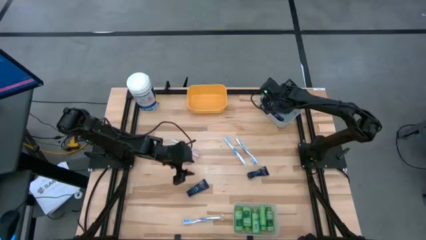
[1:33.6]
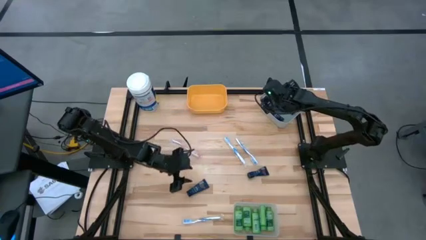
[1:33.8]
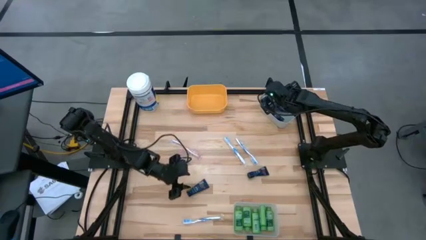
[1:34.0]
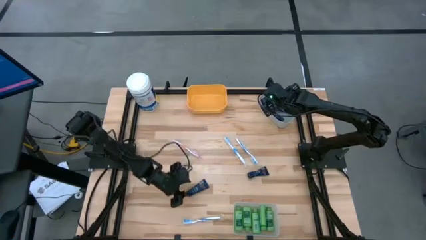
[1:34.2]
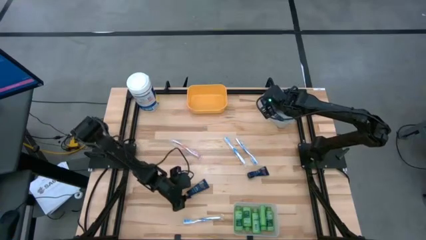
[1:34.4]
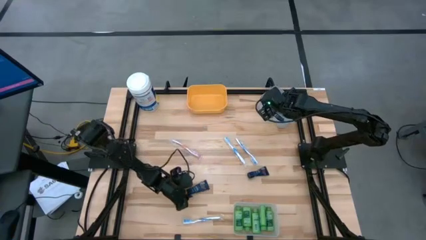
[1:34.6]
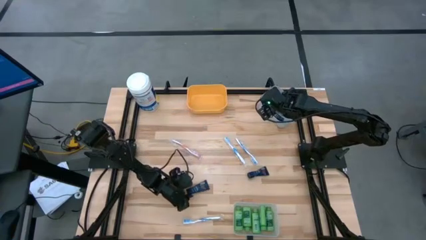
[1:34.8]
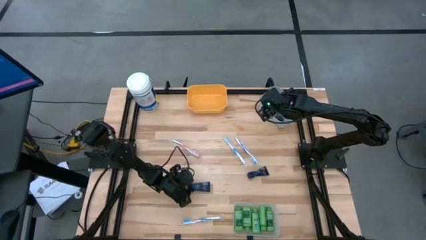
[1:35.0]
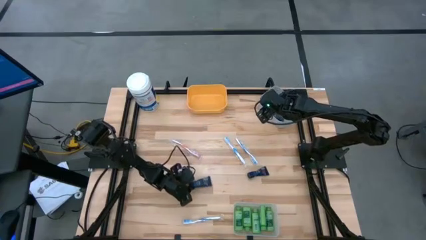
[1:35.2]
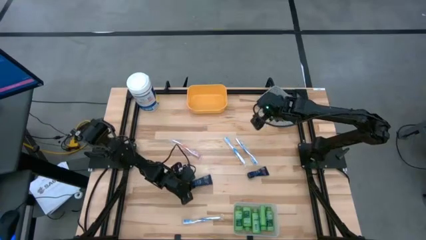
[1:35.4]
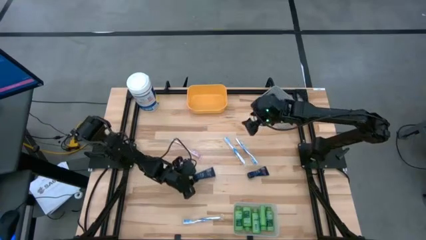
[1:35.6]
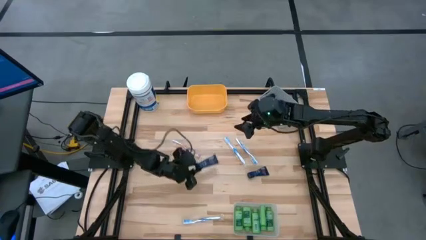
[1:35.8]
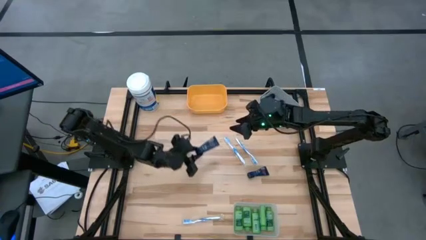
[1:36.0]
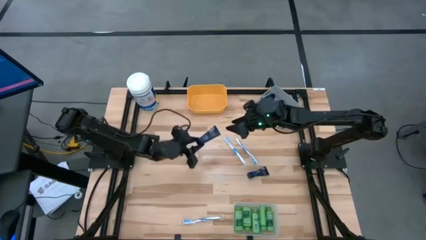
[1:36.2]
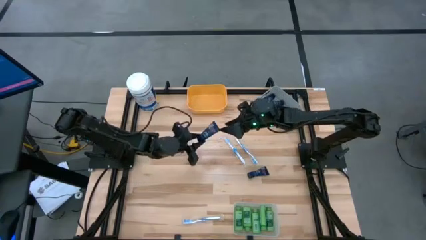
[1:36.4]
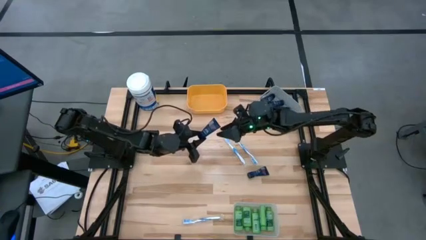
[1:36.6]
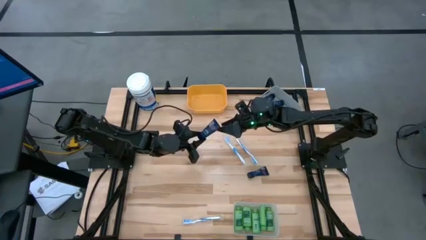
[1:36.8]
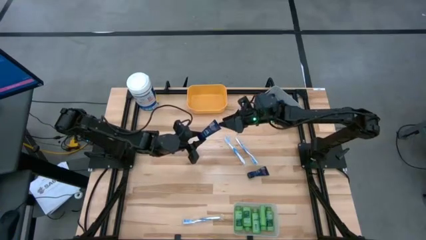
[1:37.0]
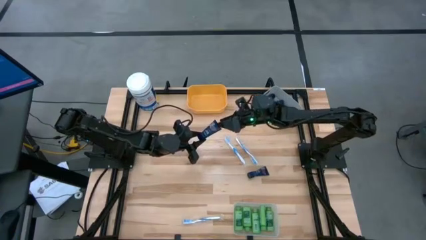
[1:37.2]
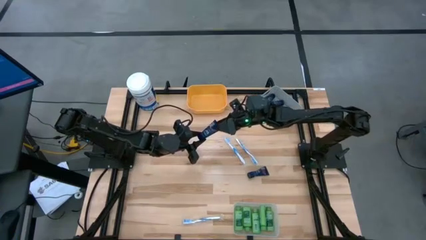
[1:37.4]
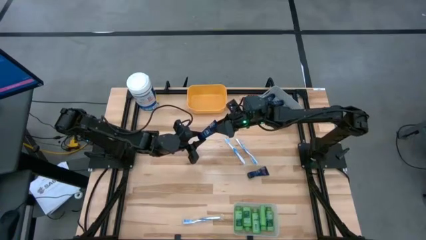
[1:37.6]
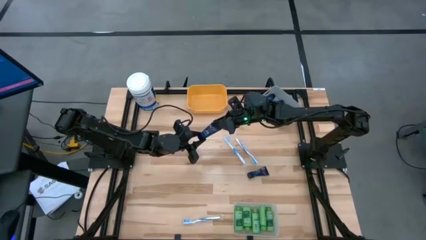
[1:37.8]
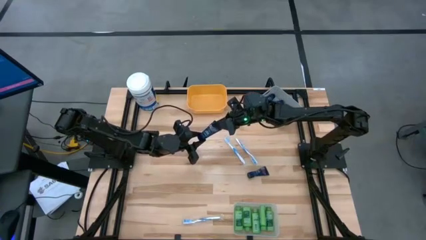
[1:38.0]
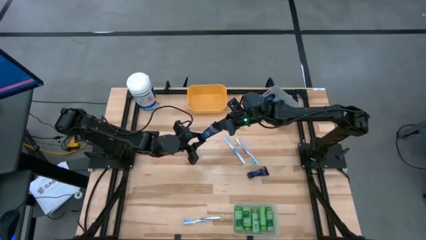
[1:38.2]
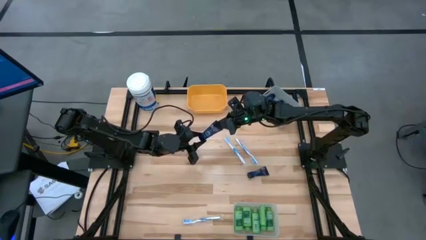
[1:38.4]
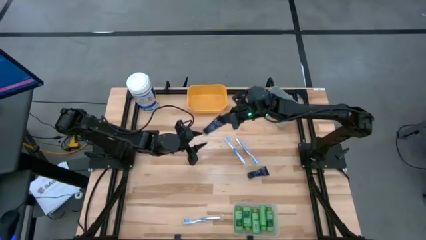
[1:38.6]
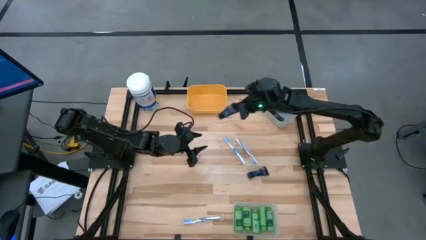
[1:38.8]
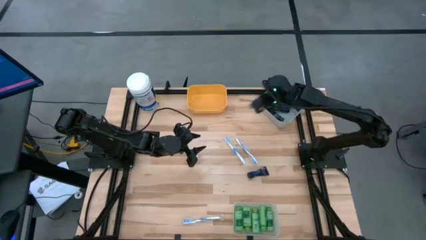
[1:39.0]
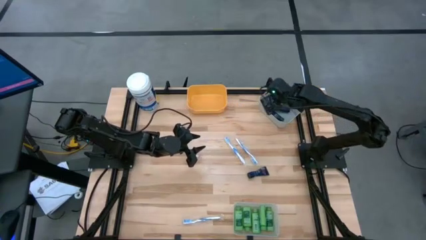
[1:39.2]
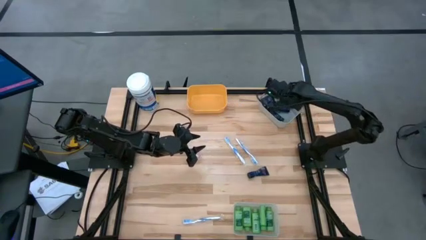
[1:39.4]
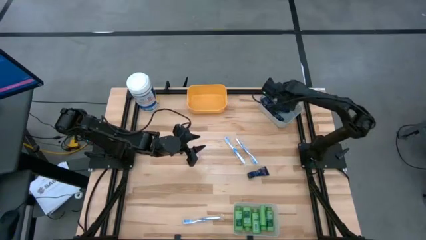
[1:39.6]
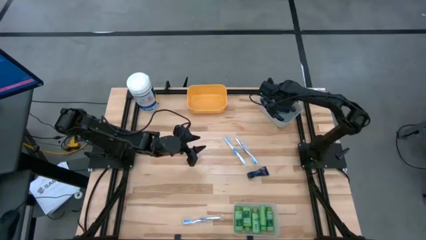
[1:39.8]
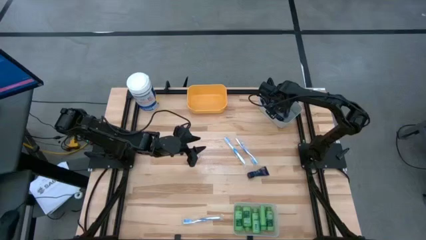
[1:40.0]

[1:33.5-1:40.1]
Task: Pick & Place Travel size toiletries
Put the blue shaving cream into the grey bin

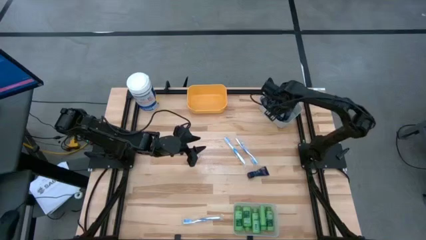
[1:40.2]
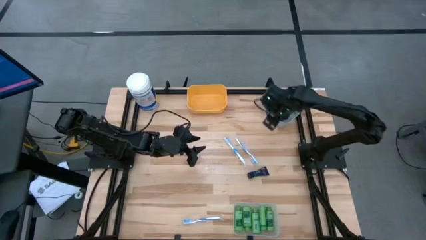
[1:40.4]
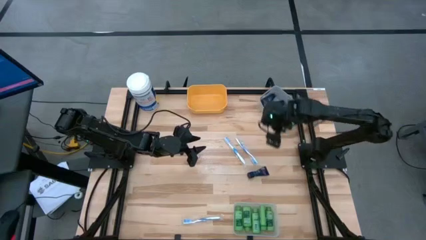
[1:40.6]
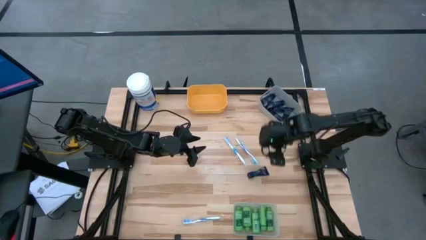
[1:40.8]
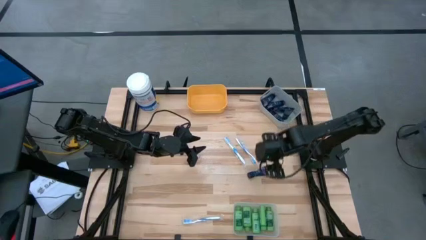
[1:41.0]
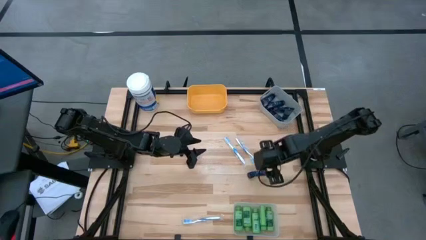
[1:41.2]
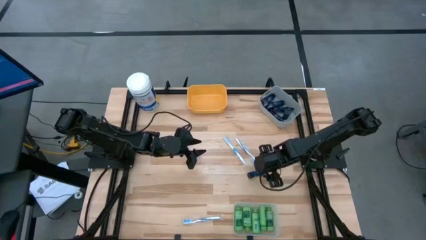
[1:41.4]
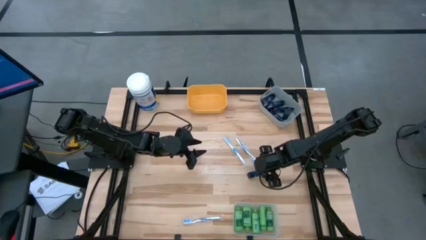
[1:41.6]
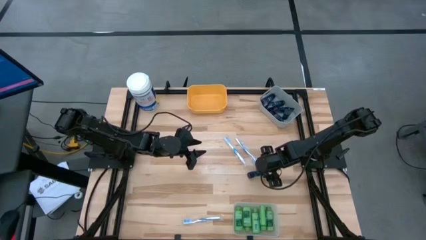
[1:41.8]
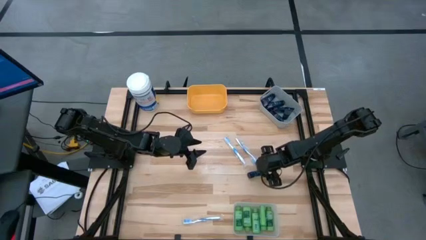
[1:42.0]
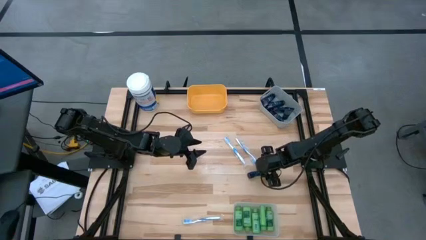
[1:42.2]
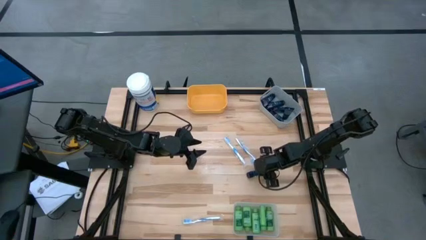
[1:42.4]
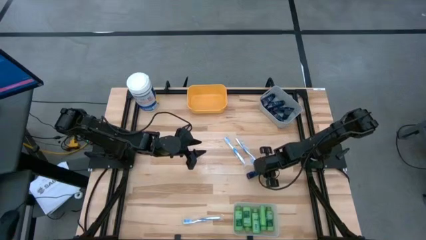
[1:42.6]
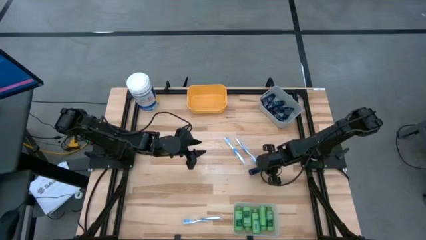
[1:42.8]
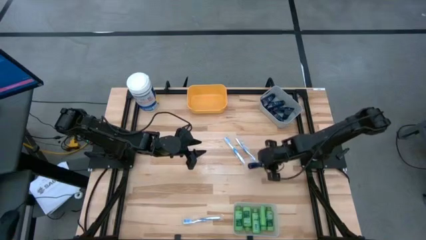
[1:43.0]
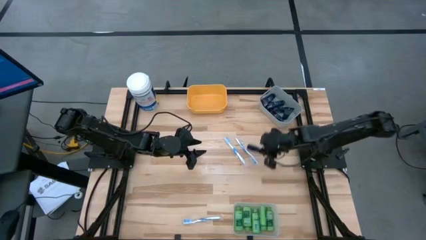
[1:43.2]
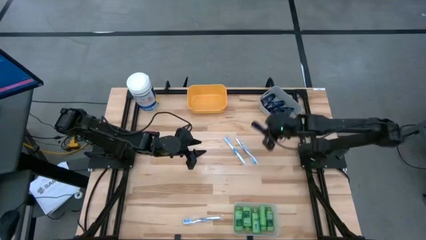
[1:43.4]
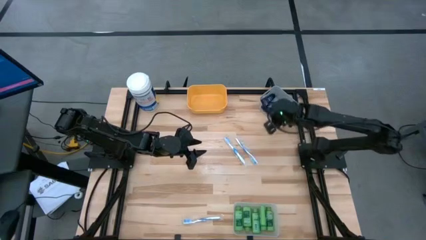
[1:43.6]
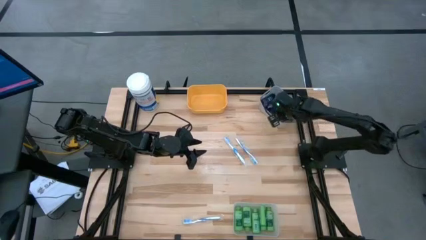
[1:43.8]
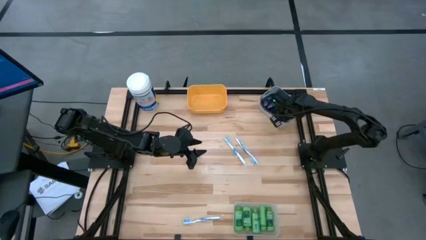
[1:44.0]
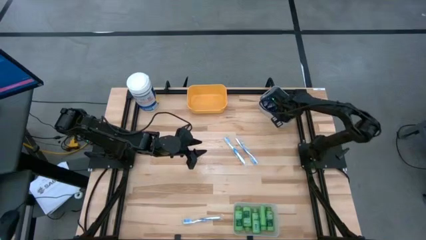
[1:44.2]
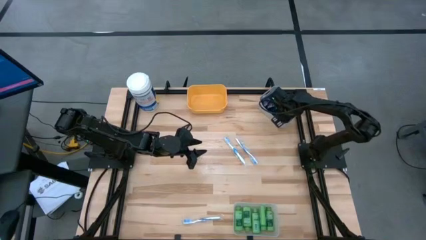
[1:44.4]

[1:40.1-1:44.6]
Put the blue shaving cream into the grey bin

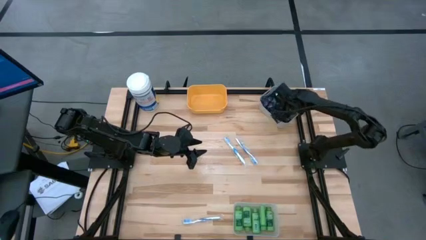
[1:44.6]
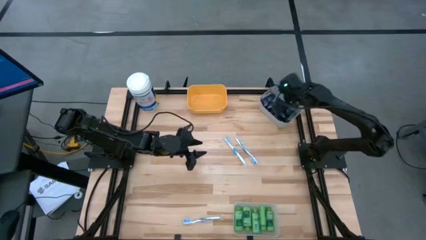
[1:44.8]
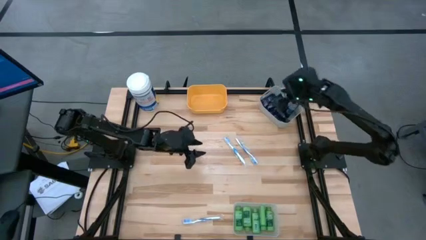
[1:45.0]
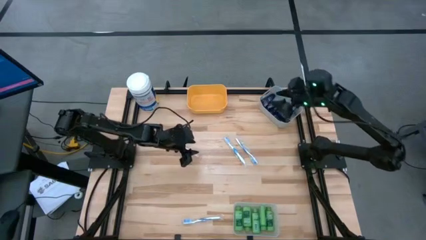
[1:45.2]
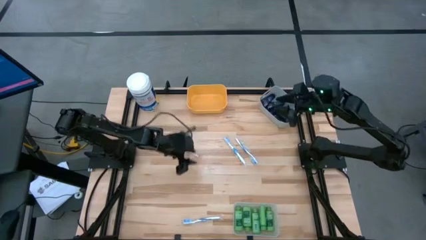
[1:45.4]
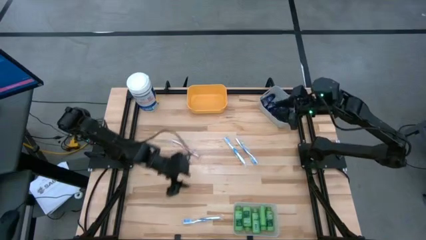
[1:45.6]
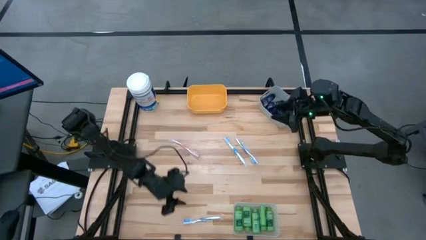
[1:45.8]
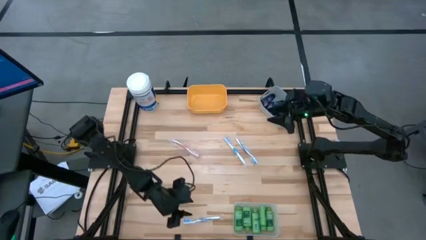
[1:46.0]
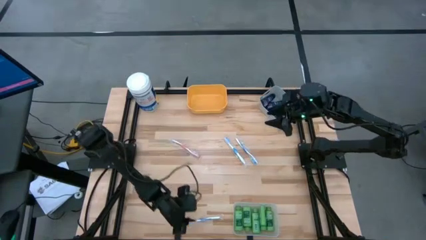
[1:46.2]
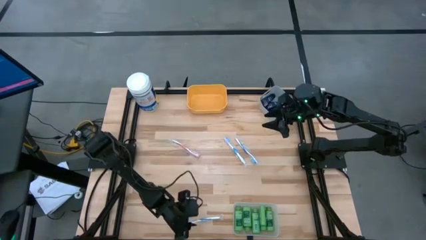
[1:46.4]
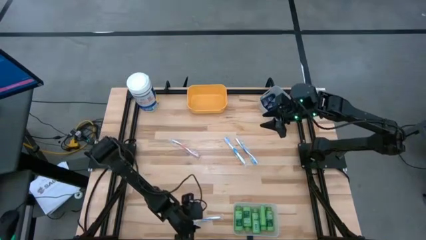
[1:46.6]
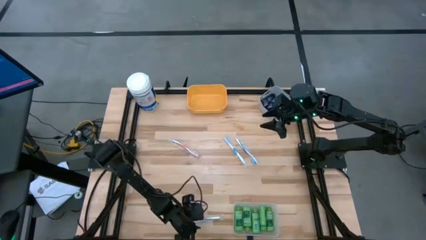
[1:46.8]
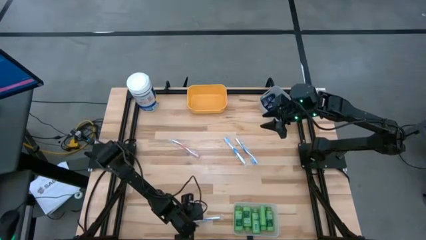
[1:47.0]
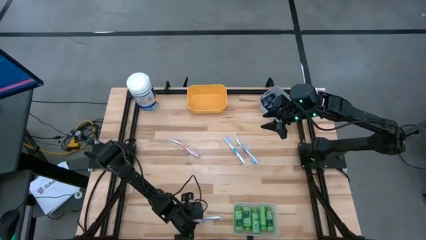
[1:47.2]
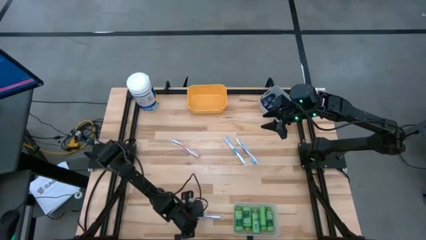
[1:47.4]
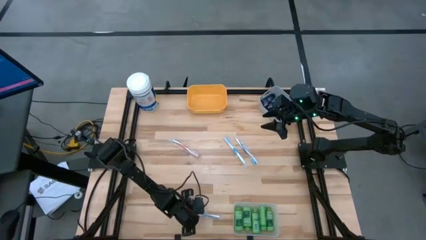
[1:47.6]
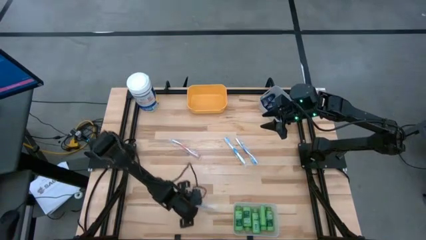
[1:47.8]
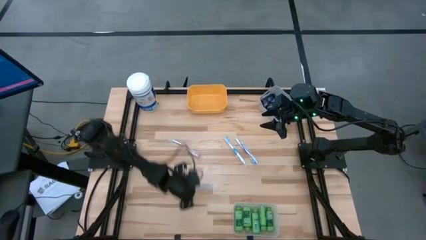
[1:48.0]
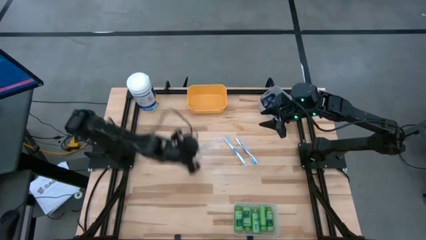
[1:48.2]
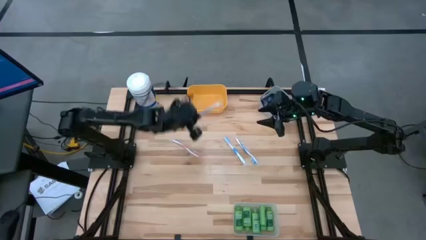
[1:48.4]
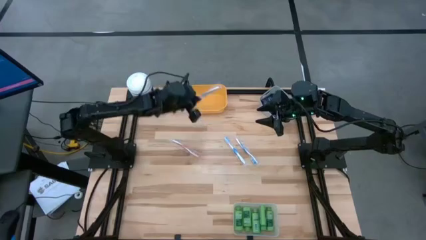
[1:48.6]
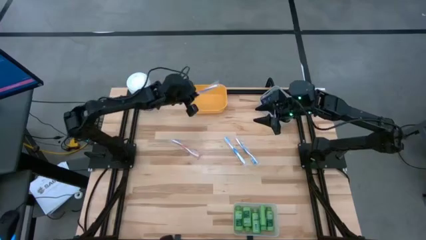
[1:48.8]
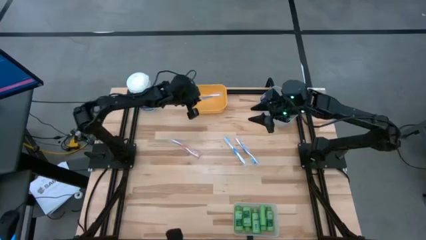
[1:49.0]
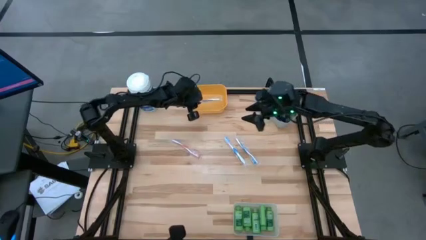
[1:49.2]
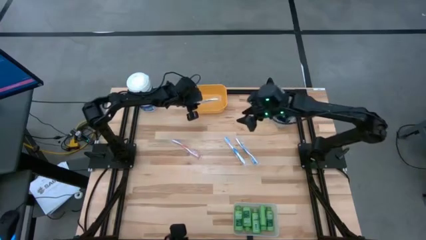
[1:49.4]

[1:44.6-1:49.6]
Put the dark blue toothbrush into the yellow bin

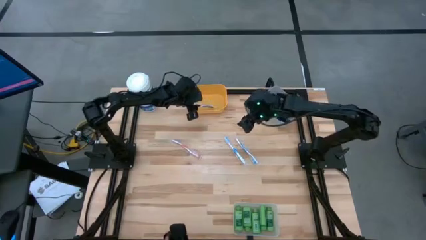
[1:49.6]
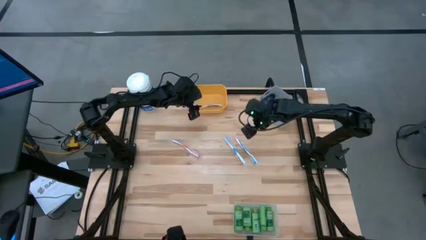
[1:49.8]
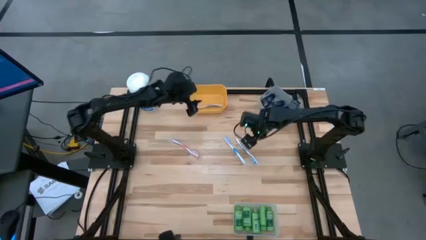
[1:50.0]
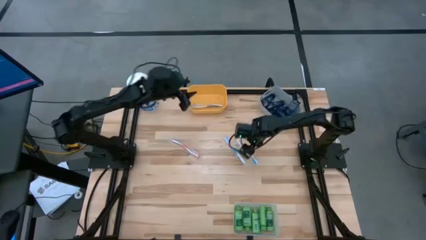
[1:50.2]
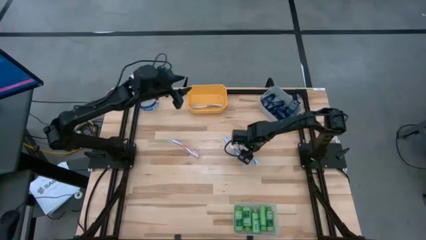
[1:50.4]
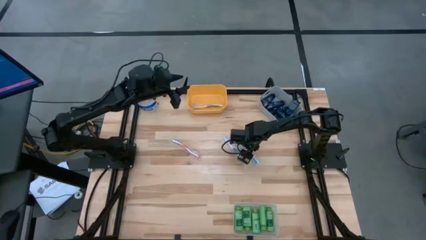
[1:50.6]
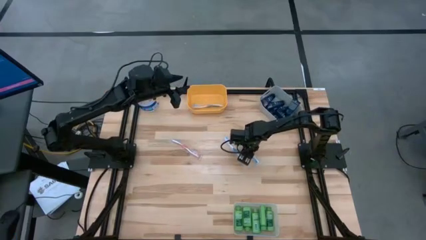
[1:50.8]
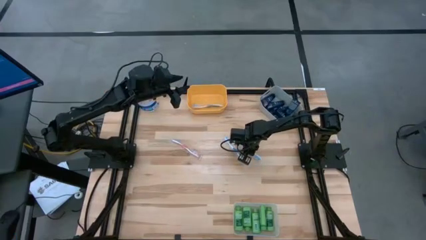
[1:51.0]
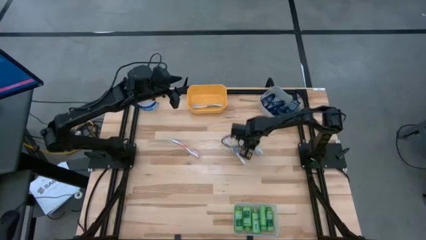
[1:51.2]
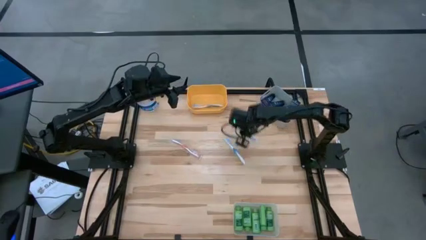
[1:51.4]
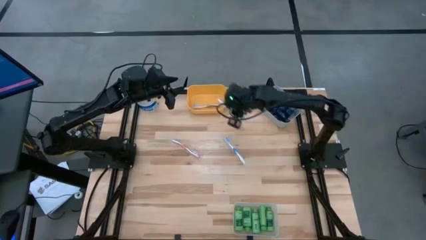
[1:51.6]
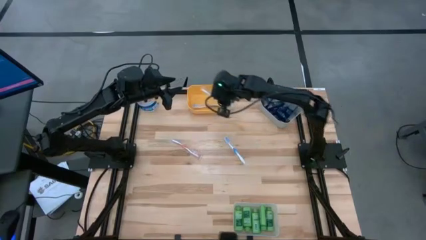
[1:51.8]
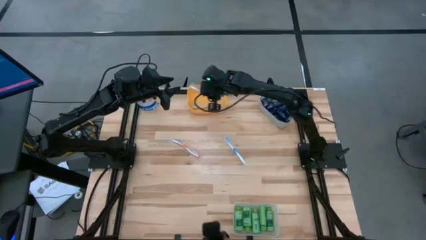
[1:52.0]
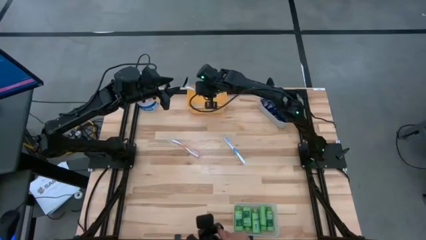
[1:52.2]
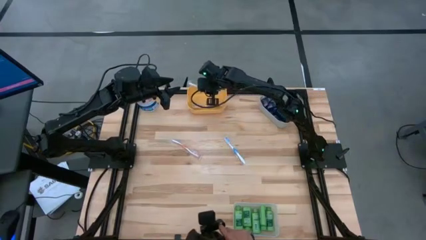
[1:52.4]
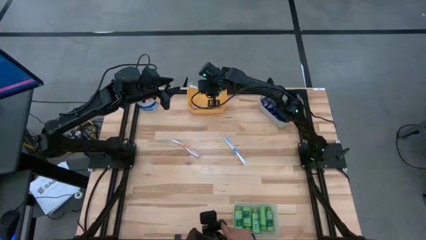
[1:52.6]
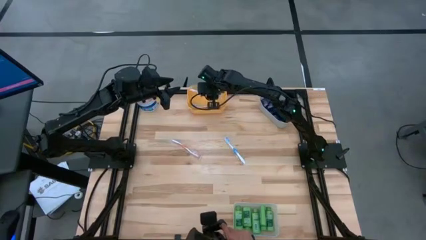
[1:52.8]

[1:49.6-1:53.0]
Put the right blue toothbrush into the yellow bin
